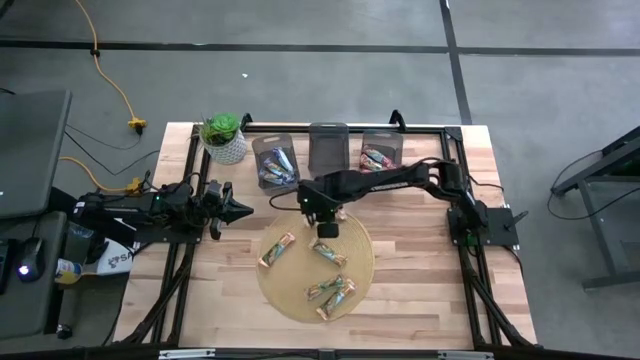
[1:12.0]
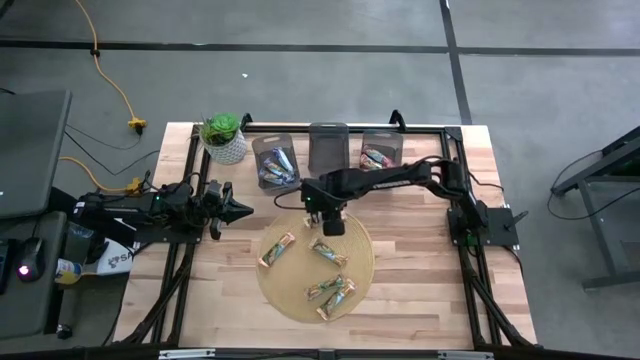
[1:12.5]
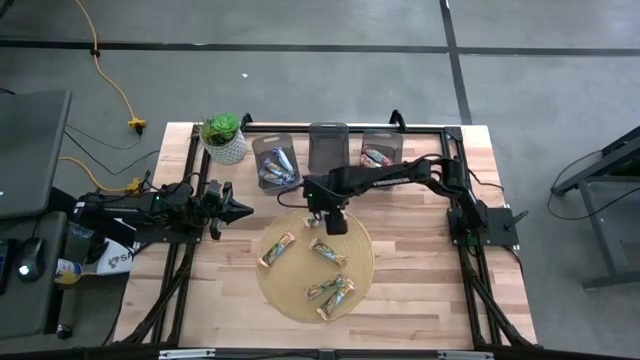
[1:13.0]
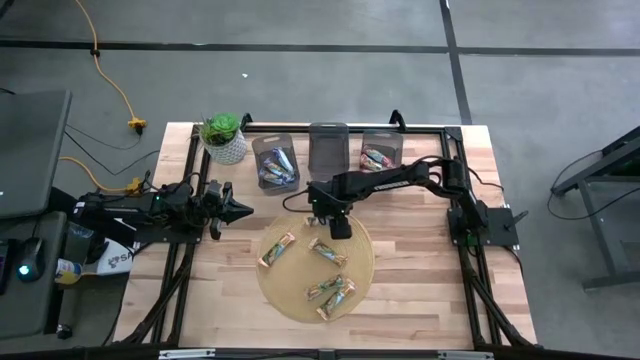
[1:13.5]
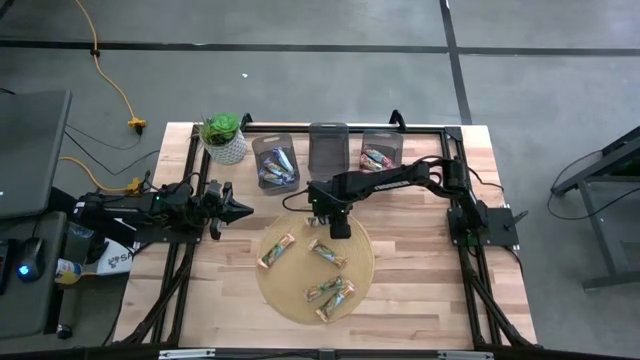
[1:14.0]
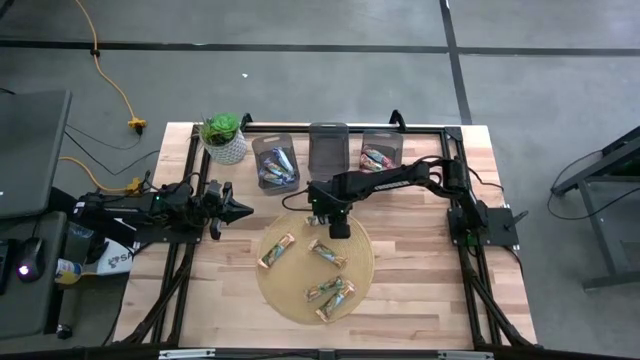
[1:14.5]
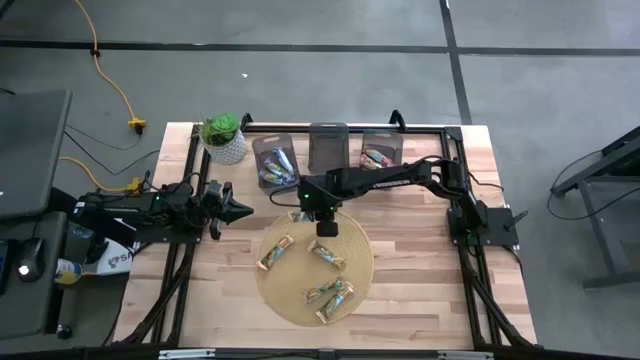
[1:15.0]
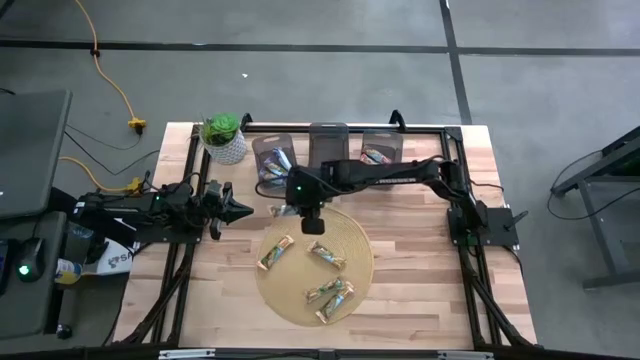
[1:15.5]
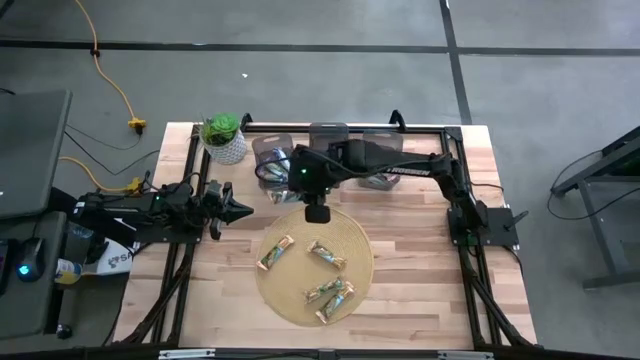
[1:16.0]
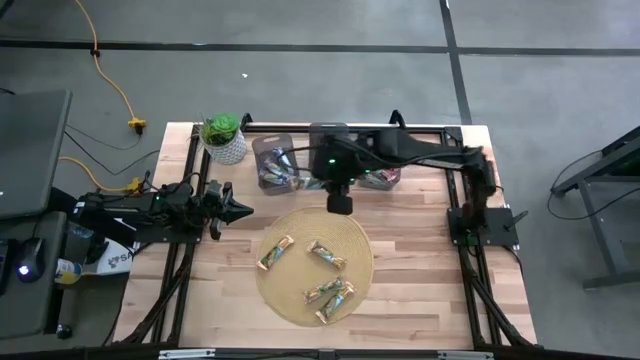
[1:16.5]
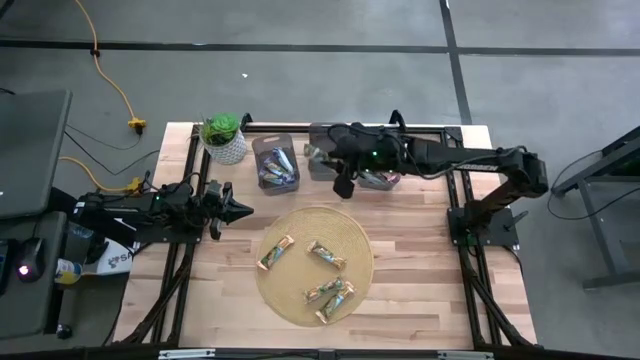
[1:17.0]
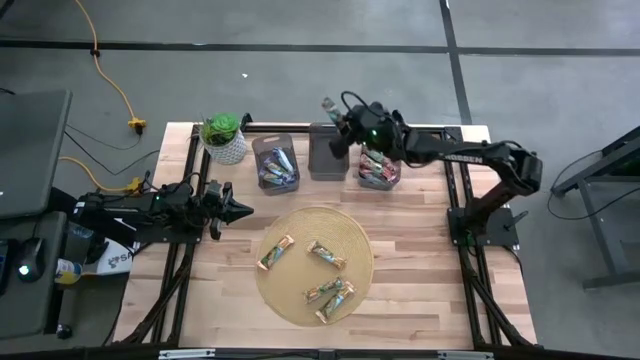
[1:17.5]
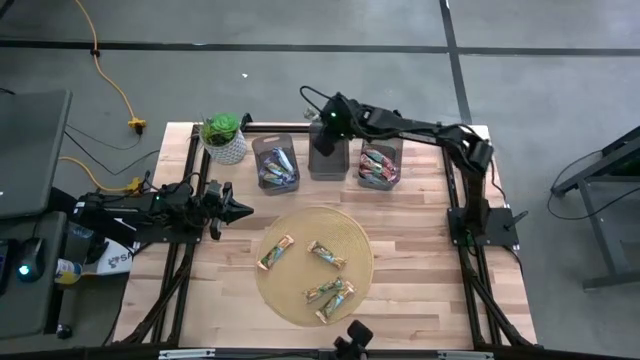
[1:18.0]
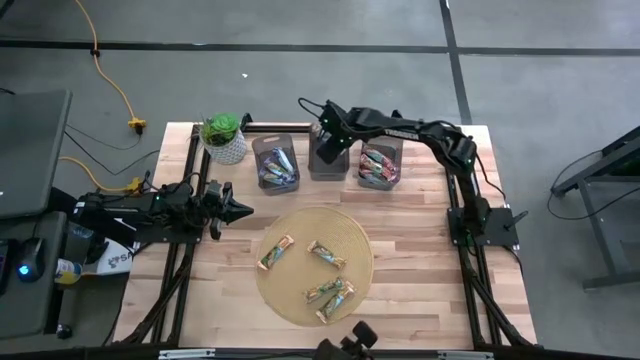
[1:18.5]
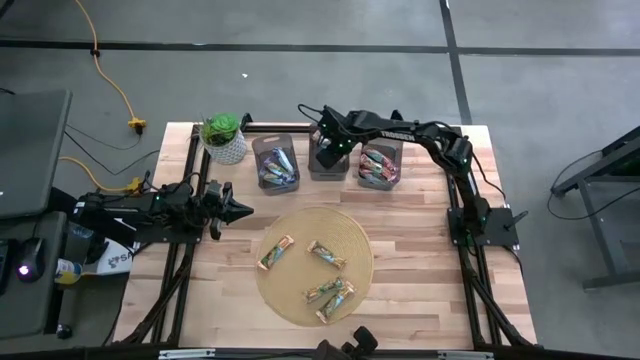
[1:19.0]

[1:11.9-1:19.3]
Task: Pick and place Granola Bars by type
Put the yellow granola bar into the center black bin

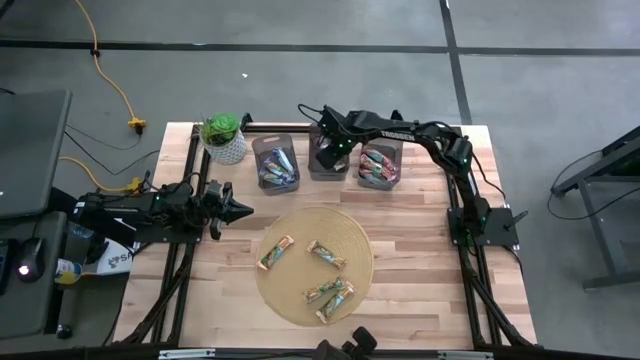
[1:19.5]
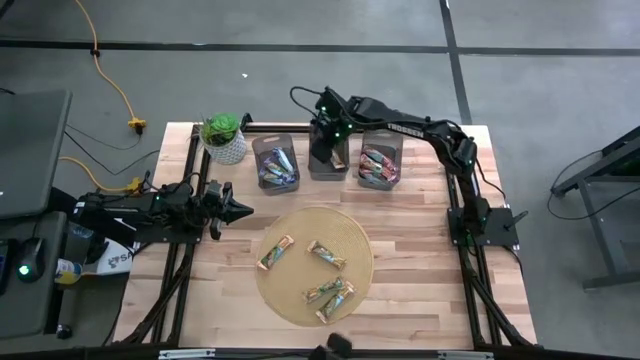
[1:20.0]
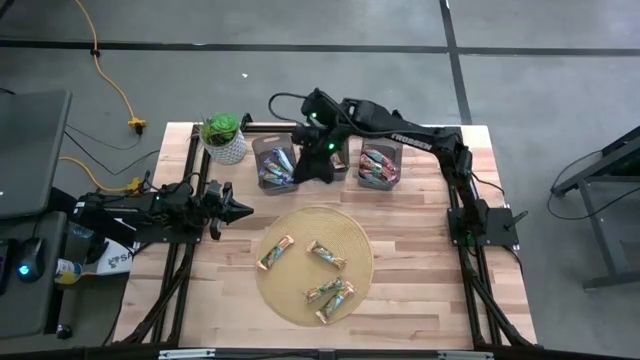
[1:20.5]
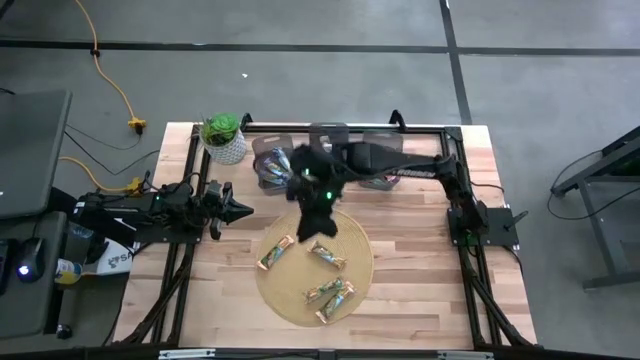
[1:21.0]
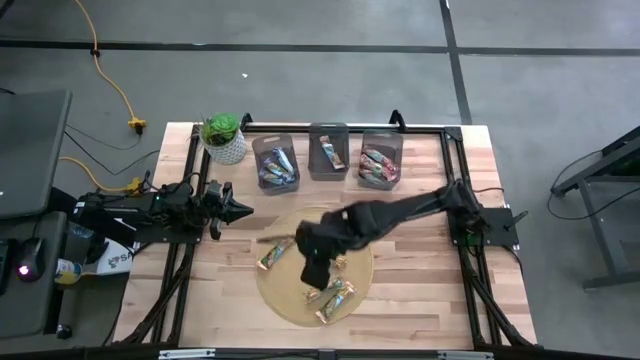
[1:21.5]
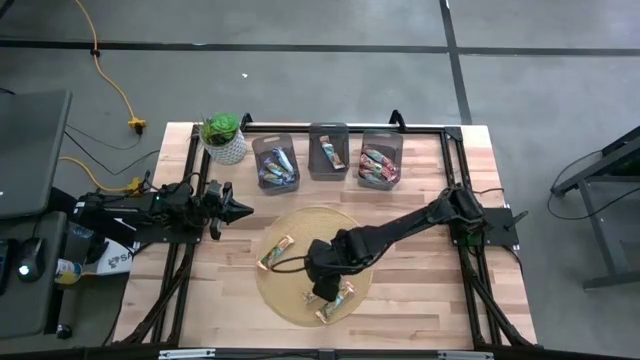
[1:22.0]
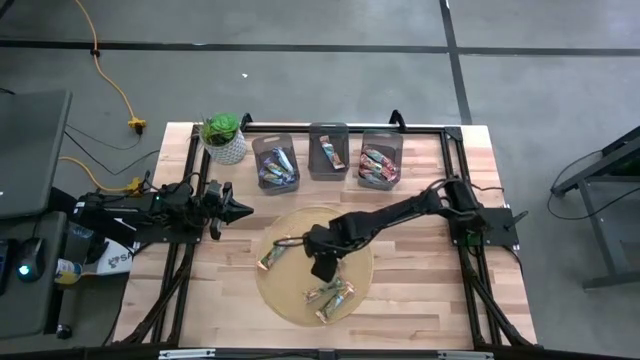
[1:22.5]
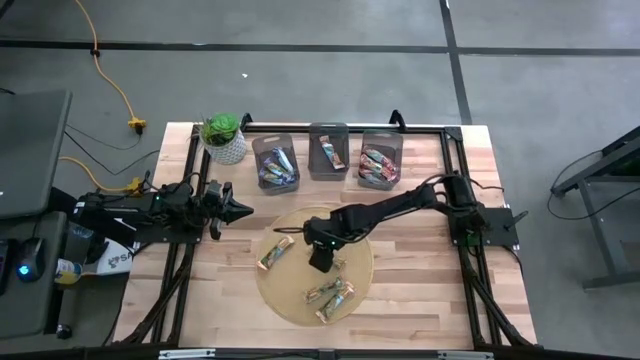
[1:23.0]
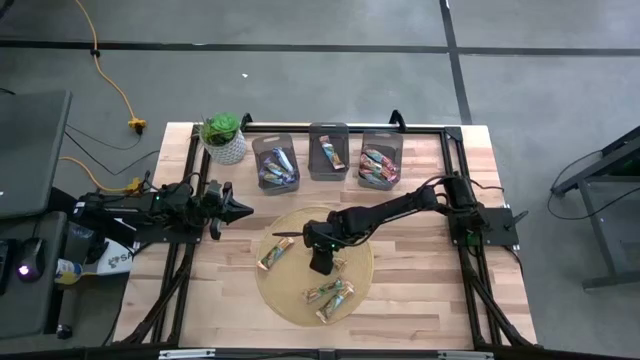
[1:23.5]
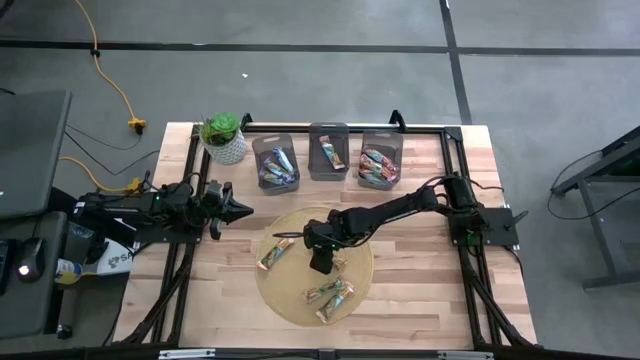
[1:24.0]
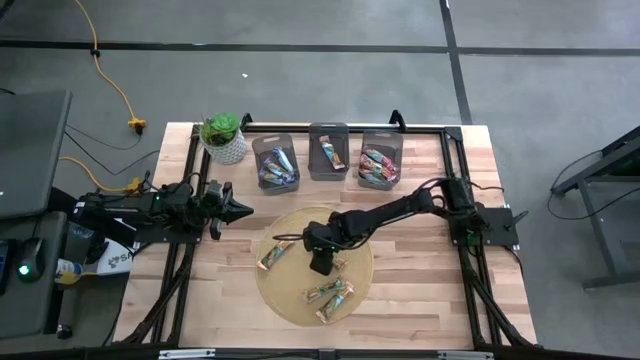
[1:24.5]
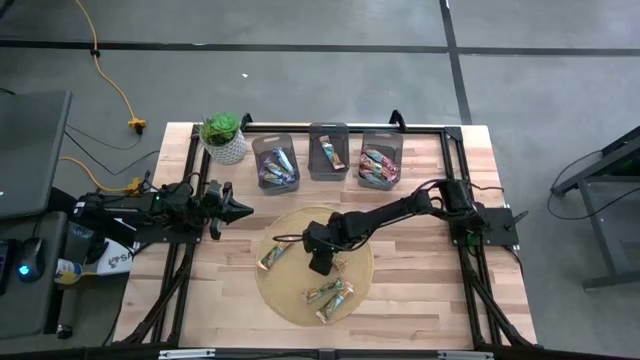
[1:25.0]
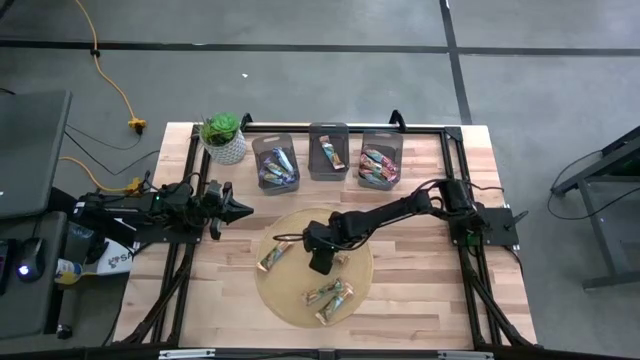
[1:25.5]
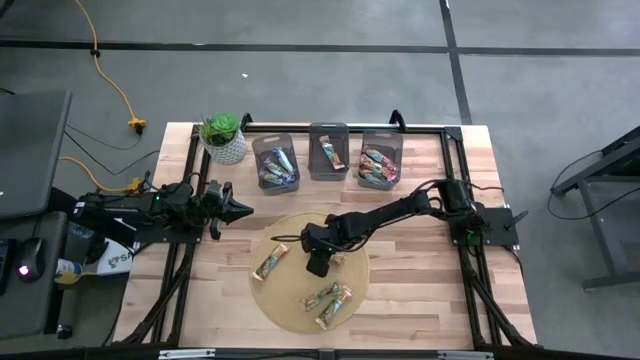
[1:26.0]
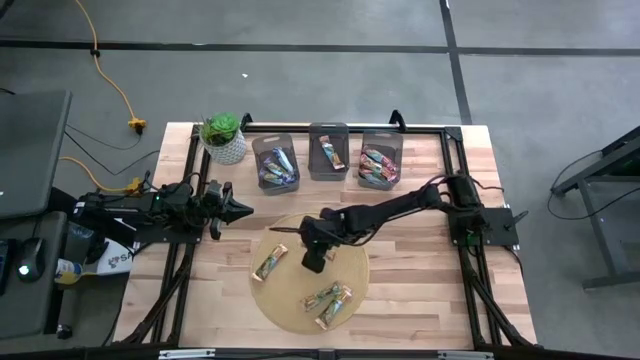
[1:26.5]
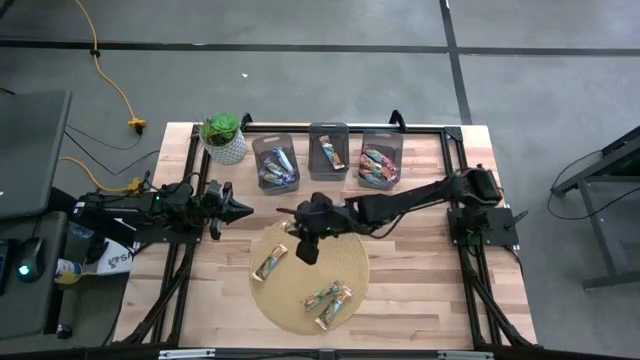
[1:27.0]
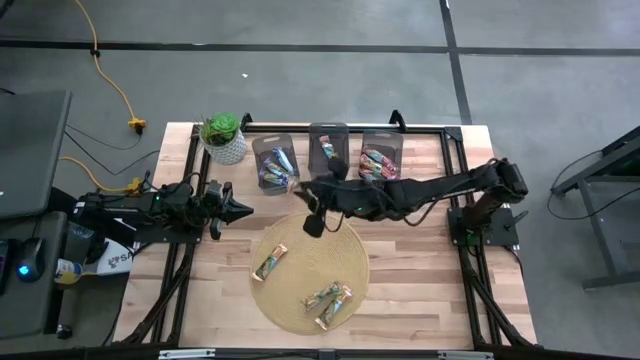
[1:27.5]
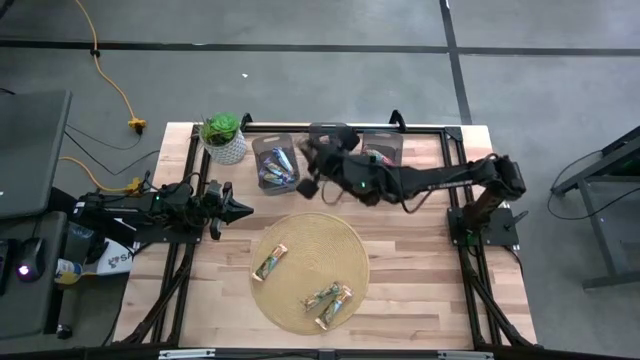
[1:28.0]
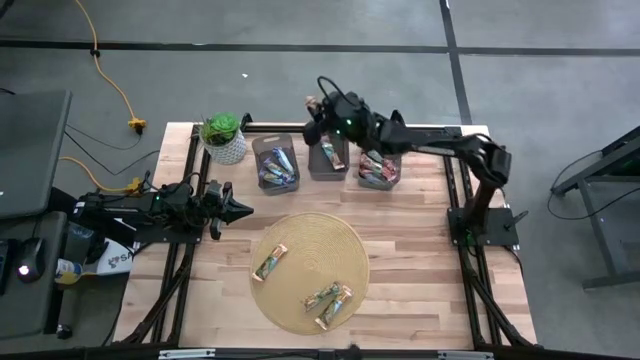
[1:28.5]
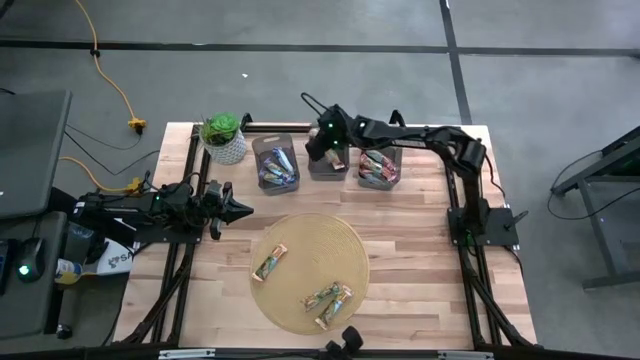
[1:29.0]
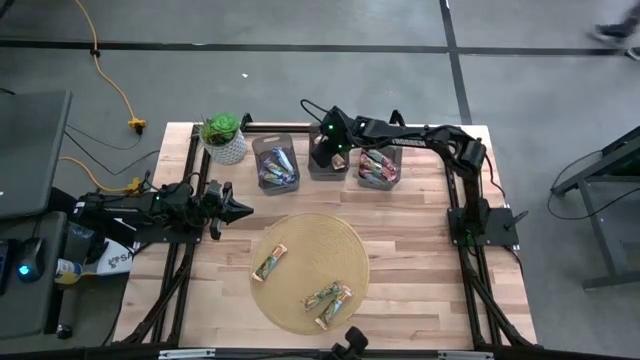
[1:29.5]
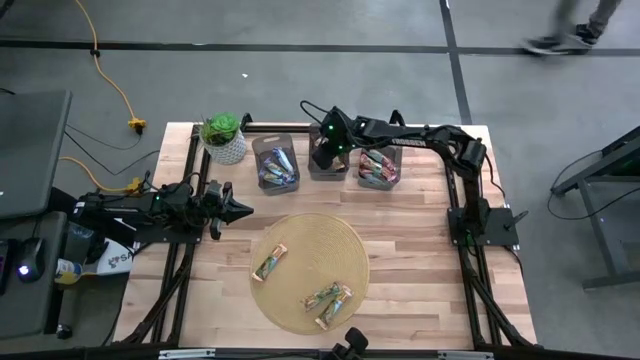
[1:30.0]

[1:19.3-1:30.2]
Put the yellow granola bar into the center black bin
